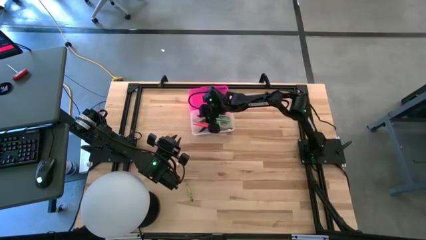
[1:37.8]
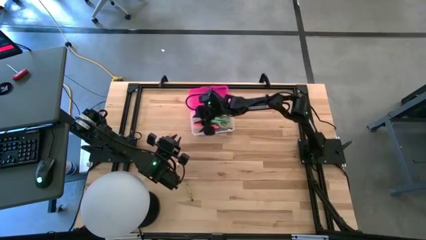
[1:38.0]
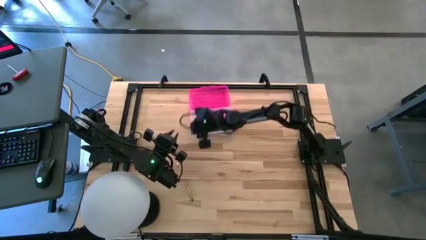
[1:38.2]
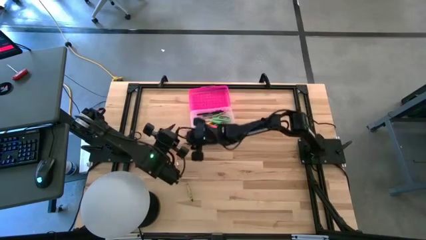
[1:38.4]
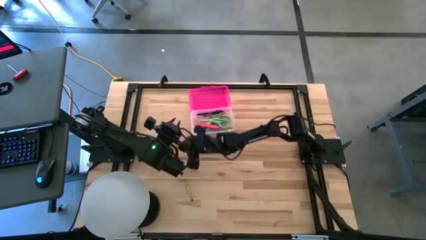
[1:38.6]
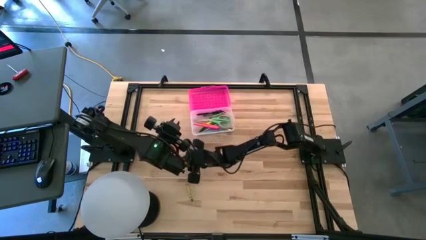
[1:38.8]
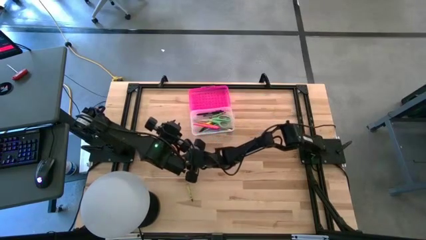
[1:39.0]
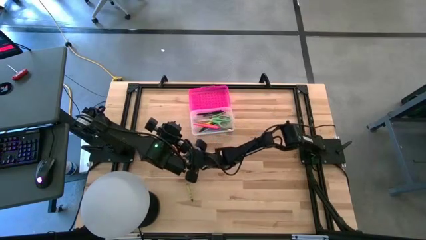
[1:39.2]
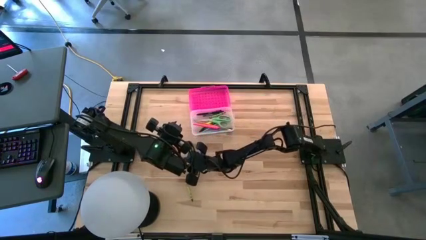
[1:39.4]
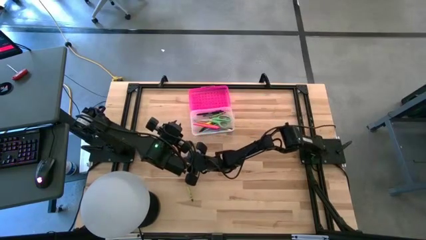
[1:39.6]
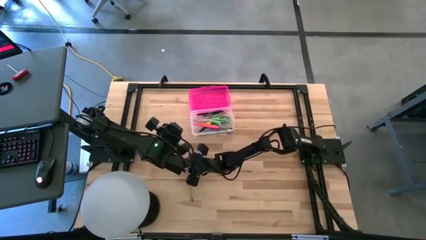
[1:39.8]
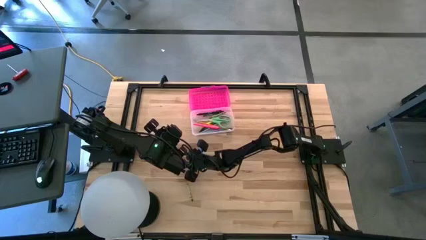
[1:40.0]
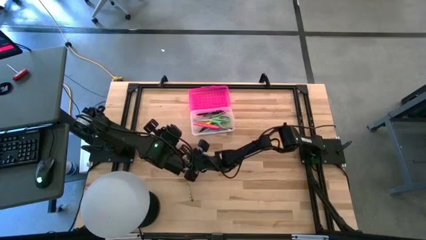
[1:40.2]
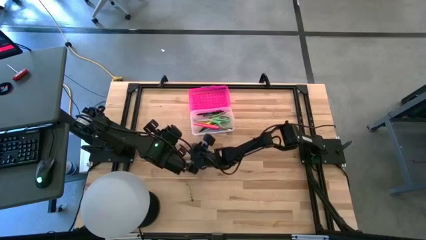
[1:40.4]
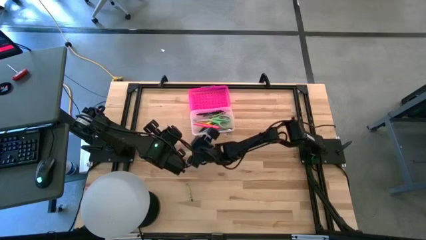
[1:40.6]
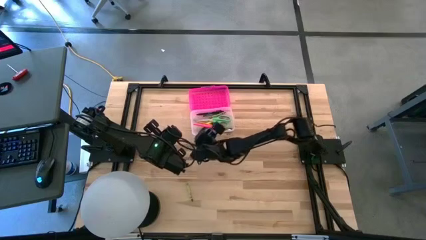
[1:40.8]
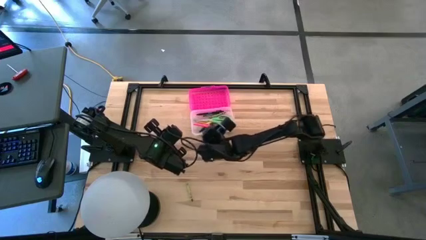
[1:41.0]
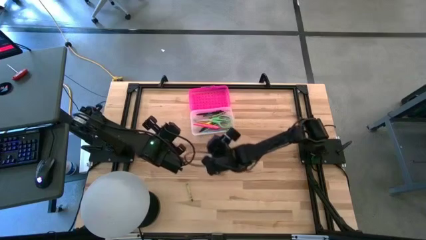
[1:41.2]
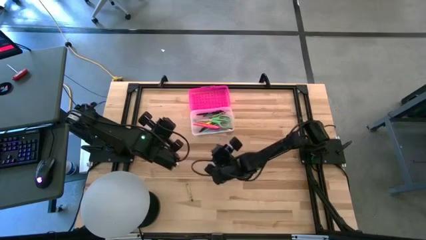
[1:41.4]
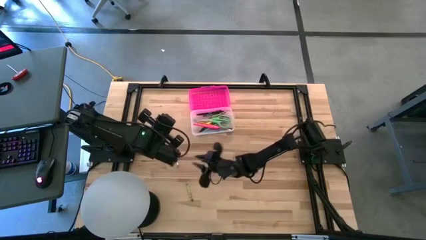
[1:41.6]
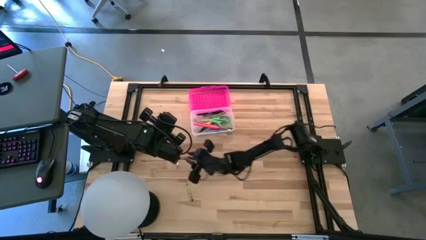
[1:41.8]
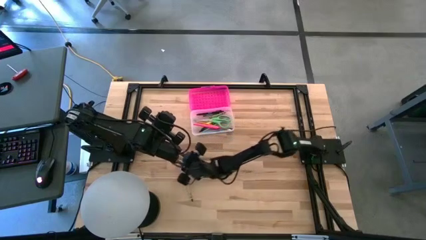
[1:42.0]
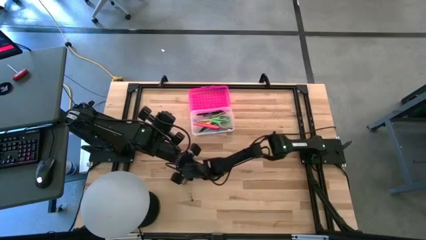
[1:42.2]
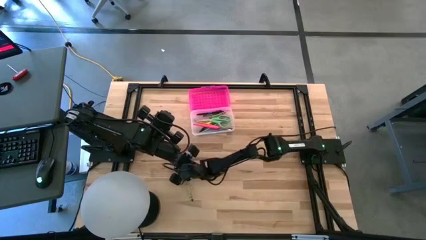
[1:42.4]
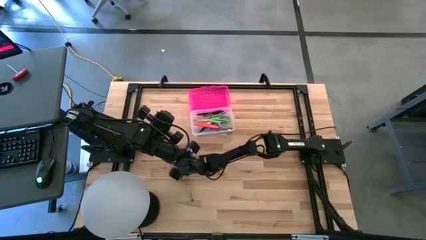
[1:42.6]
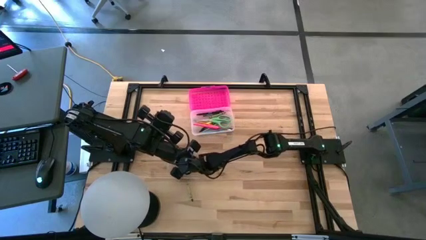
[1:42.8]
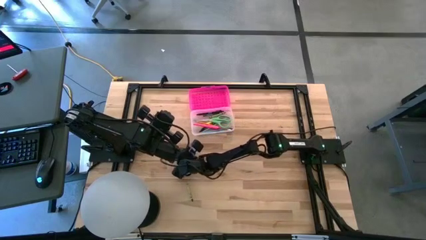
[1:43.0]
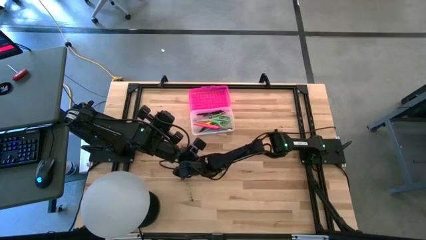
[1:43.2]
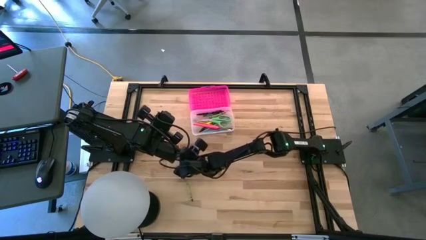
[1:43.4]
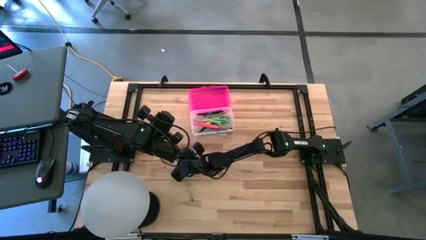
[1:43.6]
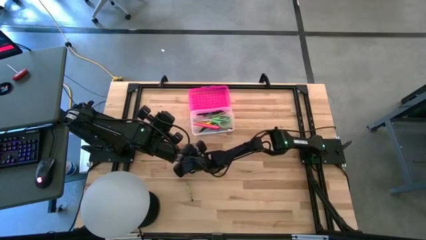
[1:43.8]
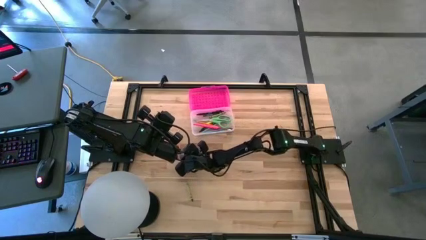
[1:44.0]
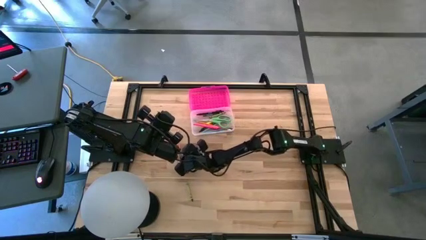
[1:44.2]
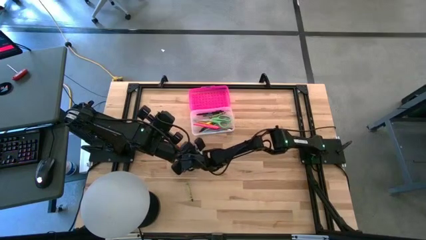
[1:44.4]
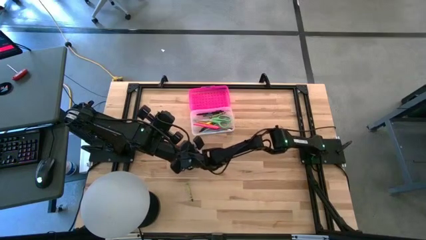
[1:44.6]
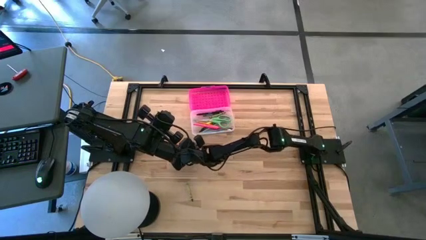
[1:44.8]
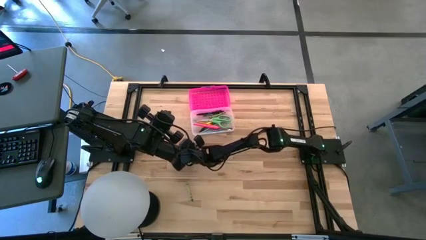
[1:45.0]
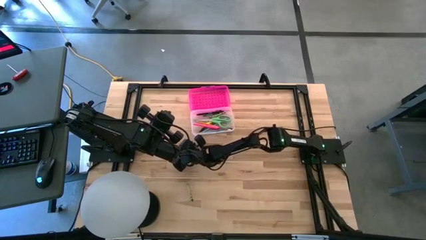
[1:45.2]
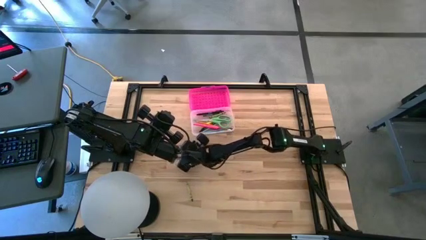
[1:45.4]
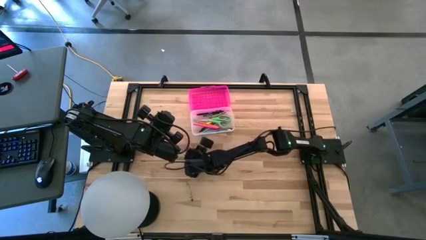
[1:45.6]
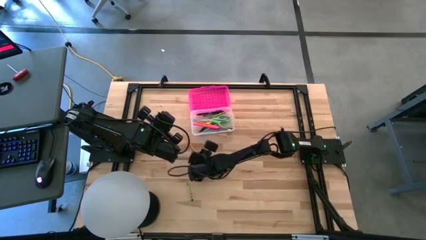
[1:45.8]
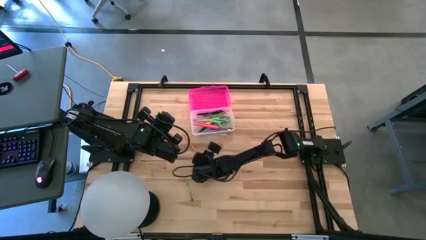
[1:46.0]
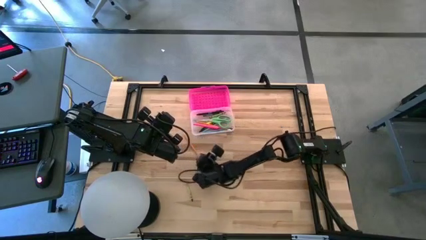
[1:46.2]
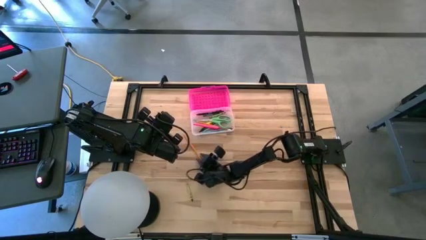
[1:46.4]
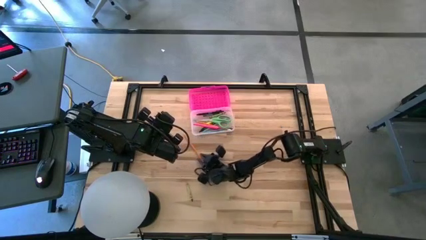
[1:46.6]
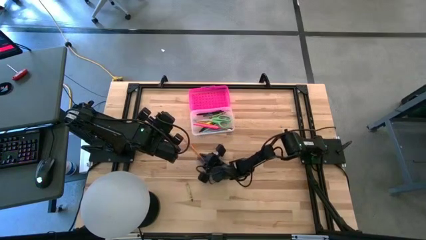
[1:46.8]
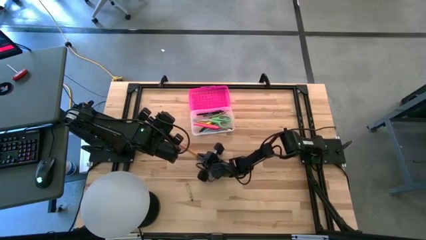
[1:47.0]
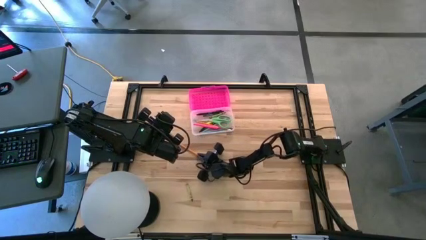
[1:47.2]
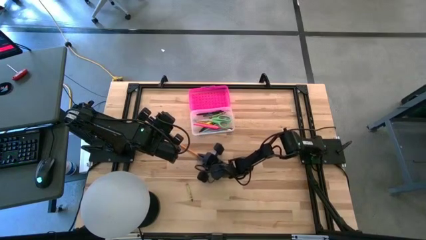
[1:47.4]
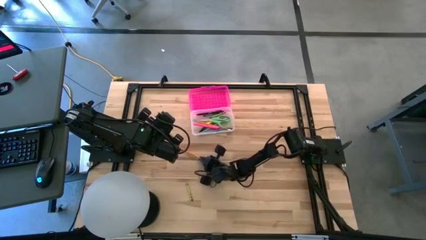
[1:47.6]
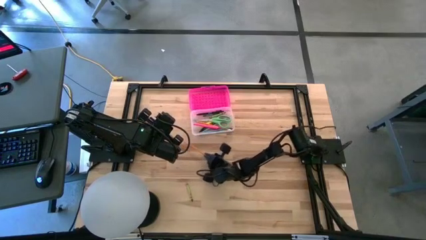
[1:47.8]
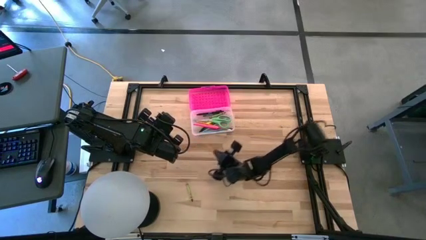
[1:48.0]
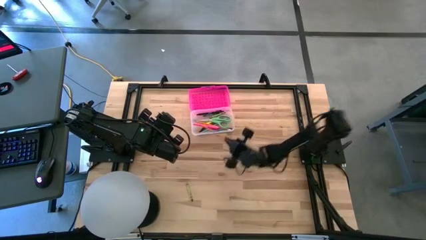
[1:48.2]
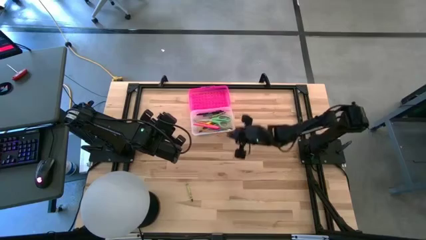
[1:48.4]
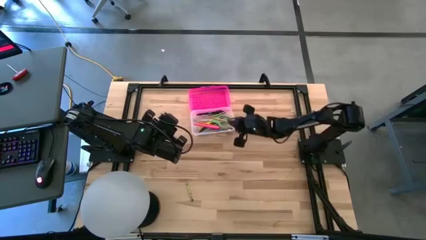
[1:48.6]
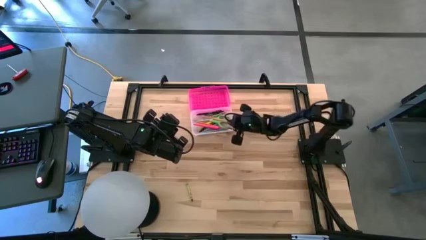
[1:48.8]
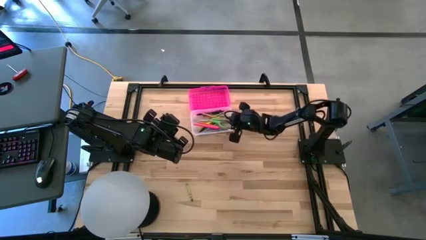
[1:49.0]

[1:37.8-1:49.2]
Task: Pick & place school supplies into a supply box
Put the orange pencil into the pink supply box

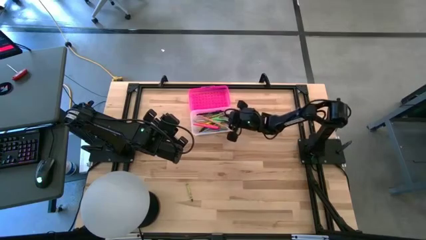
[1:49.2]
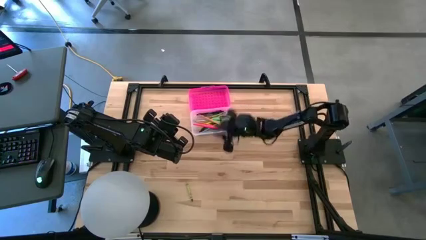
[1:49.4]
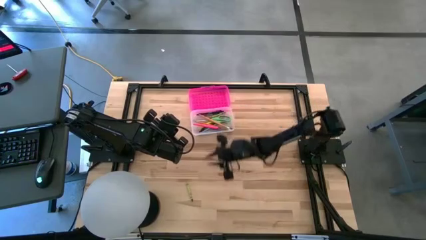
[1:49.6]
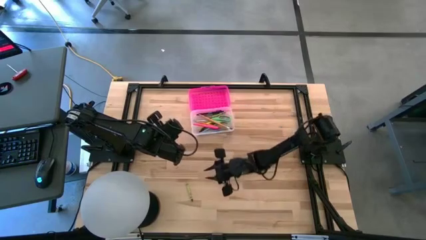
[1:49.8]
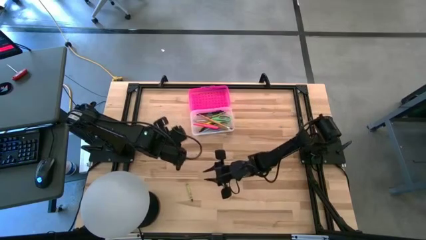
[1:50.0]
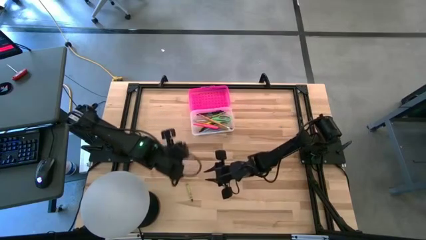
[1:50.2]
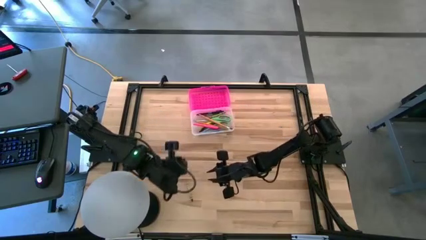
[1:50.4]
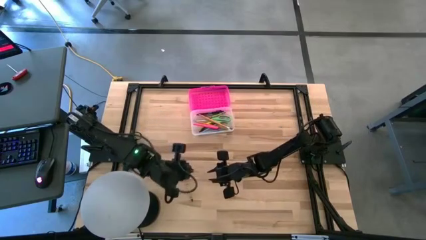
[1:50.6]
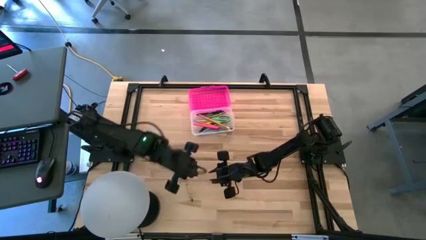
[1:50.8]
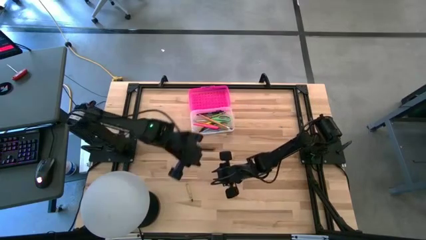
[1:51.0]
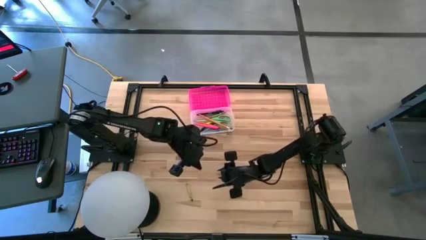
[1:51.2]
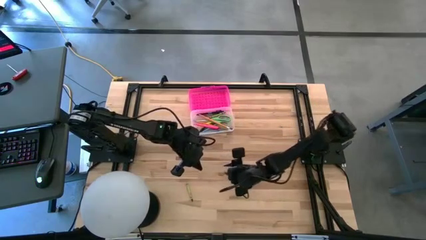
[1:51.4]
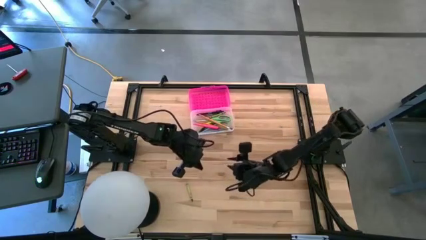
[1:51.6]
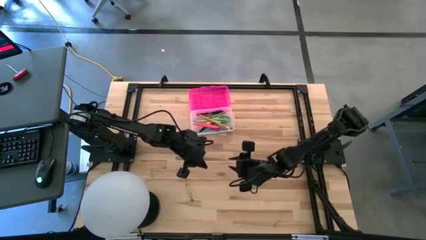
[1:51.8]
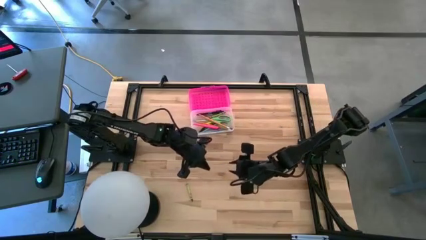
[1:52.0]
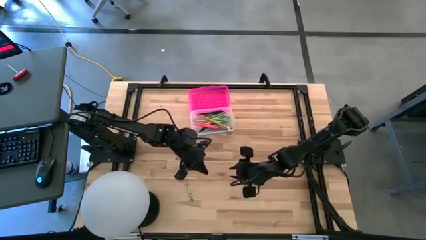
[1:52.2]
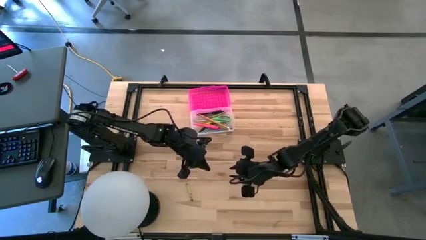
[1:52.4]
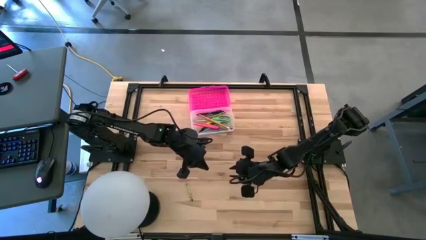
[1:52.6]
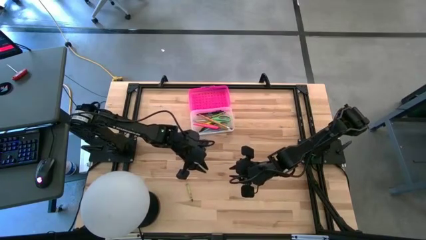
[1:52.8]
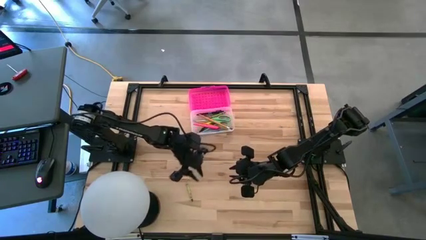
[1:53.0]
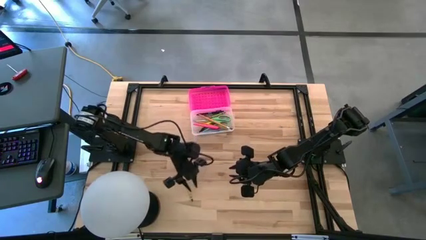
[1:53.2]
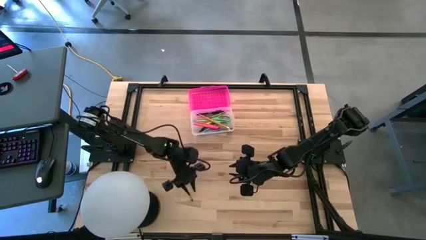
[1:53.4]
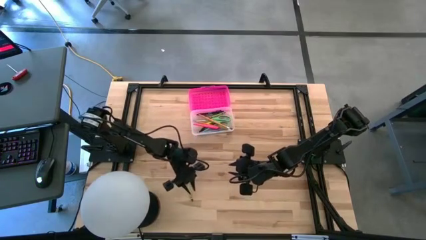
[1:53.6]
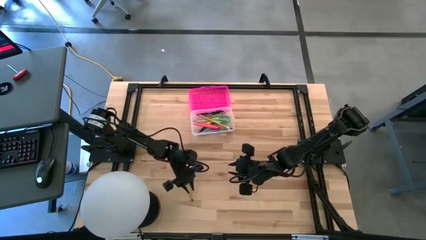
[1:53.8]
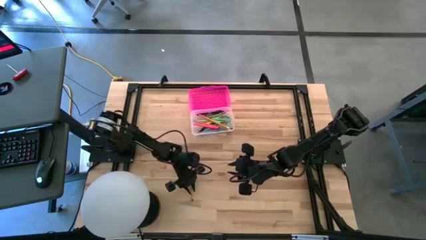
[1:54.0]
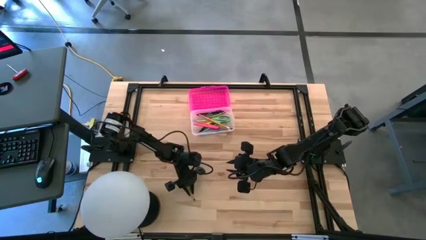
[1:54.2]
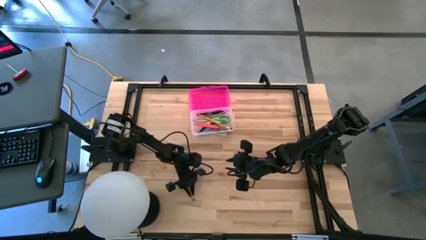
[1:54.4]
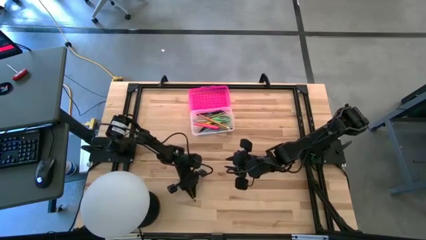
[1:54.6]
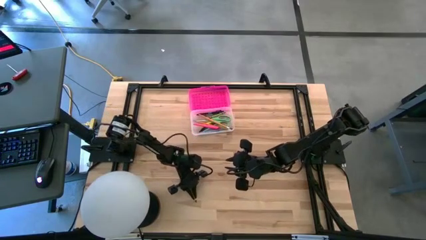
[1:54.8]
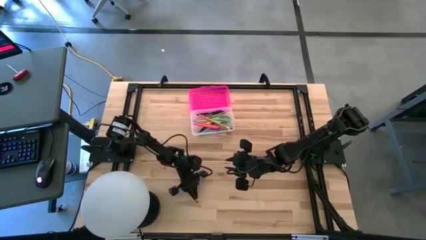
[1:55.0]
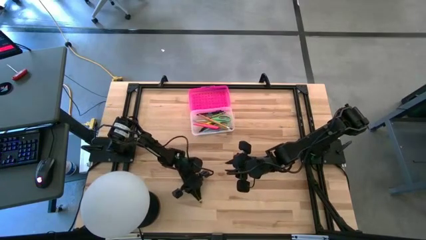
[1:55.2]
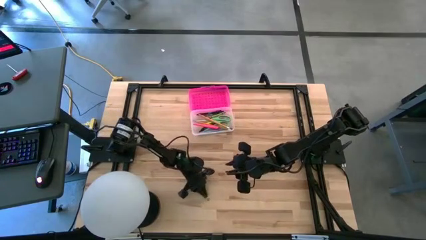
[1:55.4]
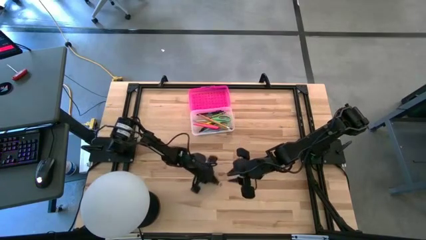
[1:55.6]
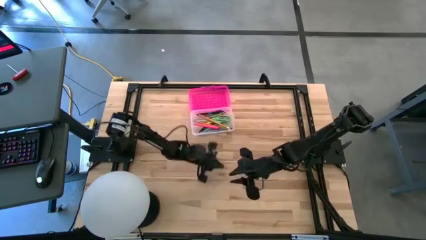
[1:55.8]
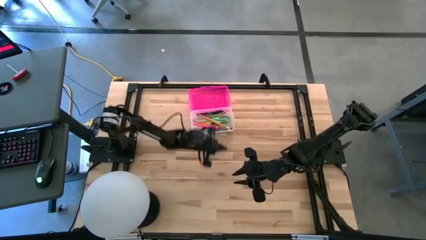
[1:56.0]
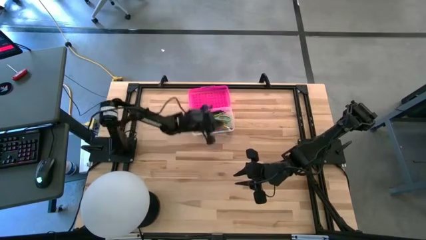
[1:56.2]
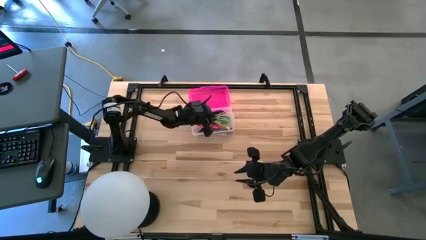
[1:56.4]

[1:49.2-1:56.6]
Put the light green crayon into the pink supply box
